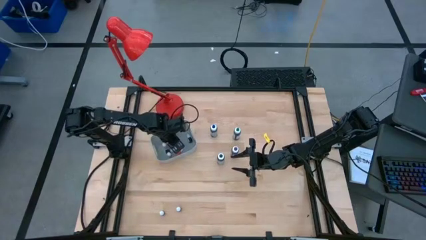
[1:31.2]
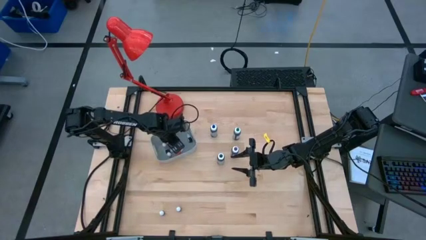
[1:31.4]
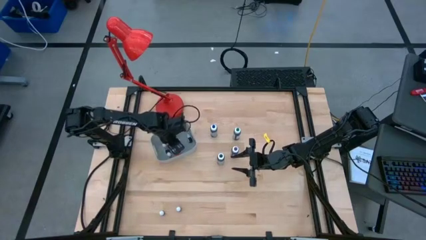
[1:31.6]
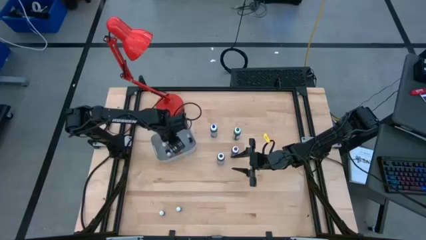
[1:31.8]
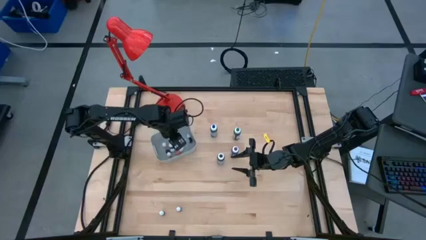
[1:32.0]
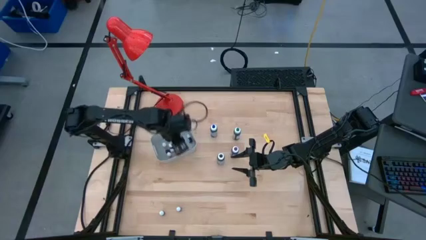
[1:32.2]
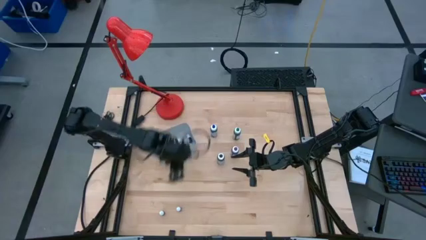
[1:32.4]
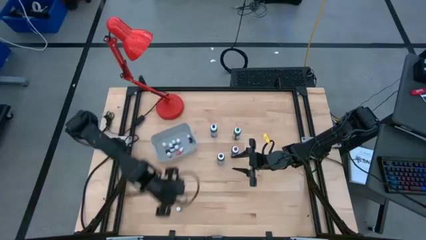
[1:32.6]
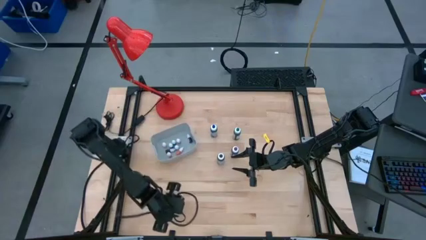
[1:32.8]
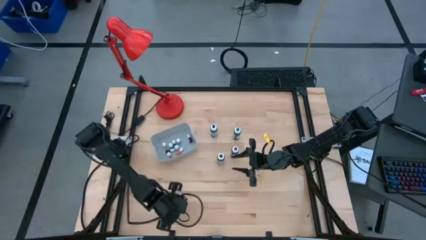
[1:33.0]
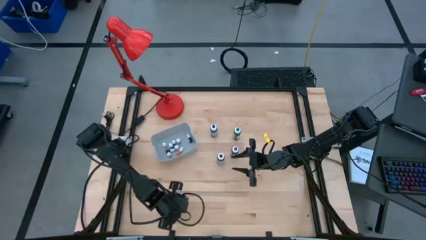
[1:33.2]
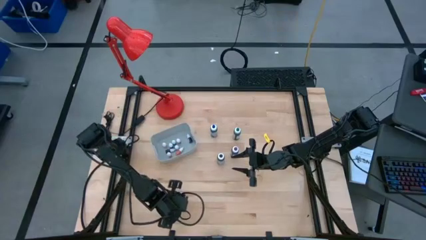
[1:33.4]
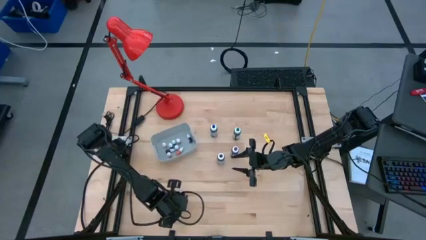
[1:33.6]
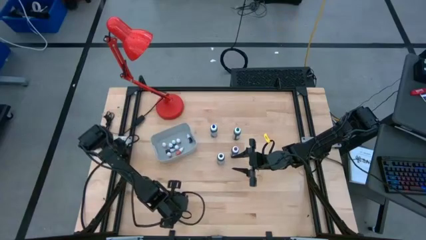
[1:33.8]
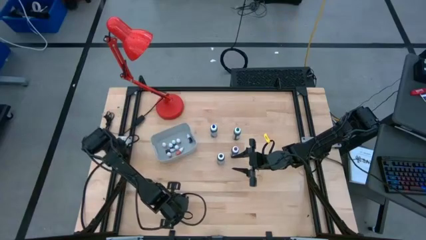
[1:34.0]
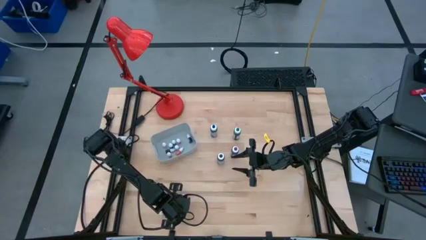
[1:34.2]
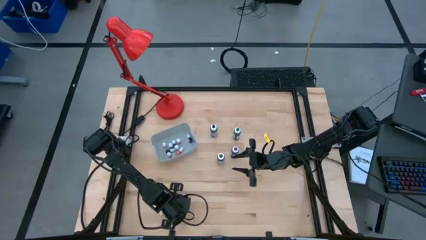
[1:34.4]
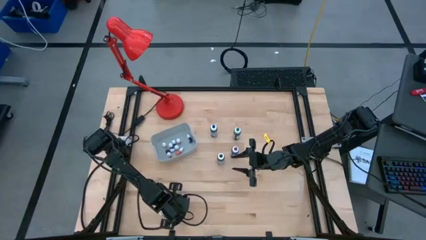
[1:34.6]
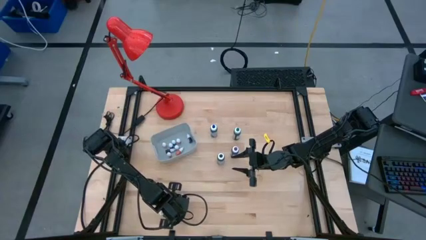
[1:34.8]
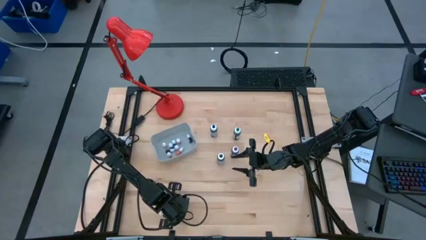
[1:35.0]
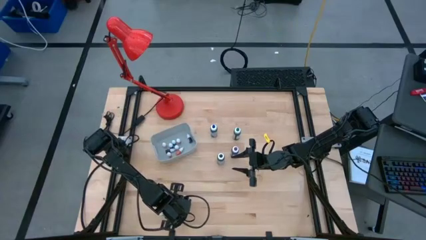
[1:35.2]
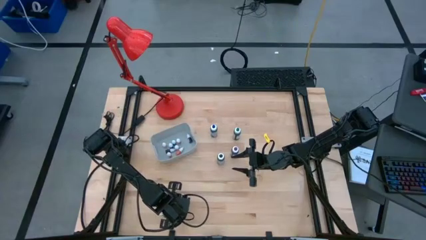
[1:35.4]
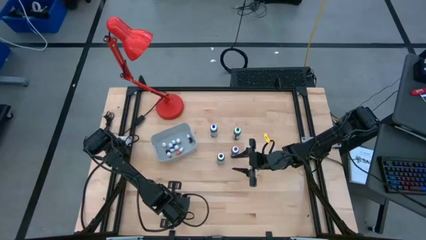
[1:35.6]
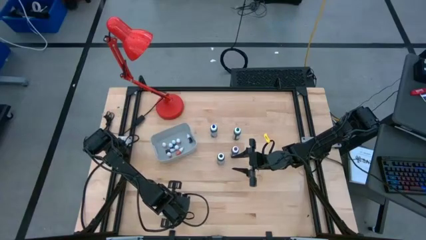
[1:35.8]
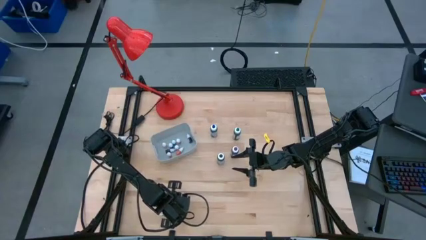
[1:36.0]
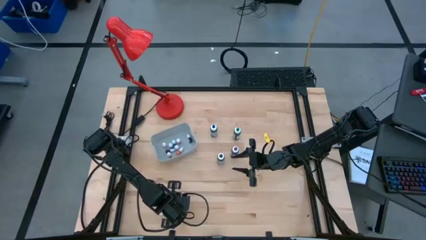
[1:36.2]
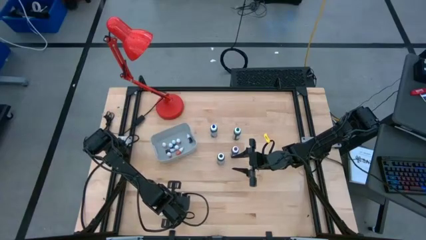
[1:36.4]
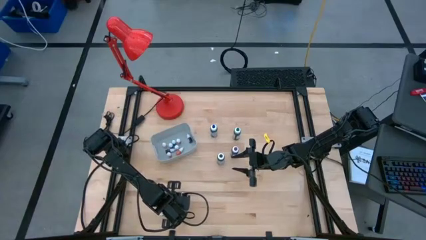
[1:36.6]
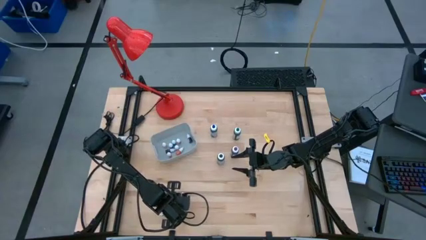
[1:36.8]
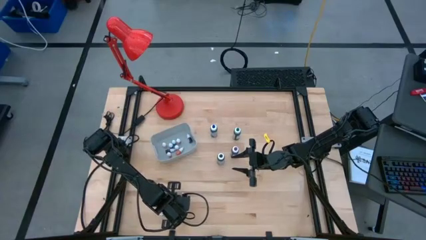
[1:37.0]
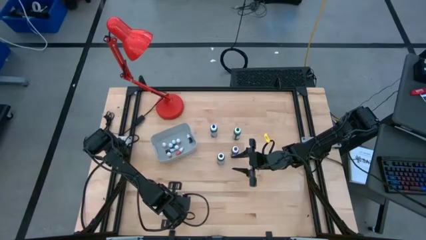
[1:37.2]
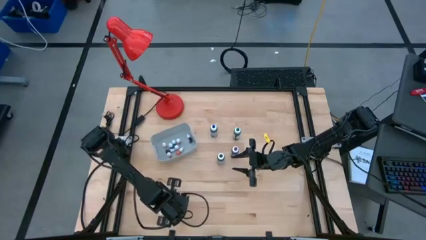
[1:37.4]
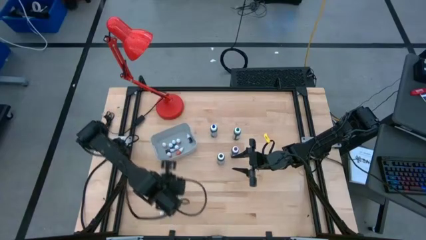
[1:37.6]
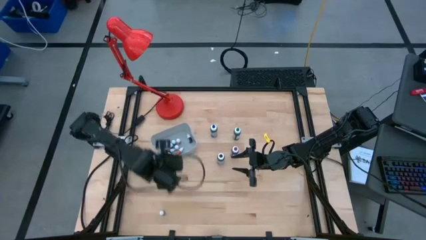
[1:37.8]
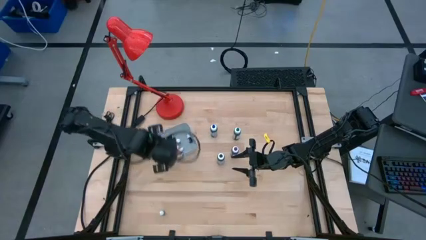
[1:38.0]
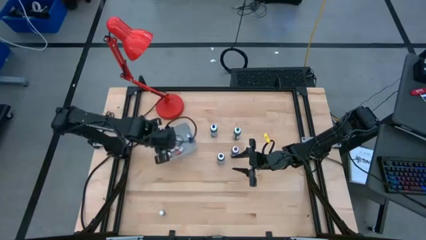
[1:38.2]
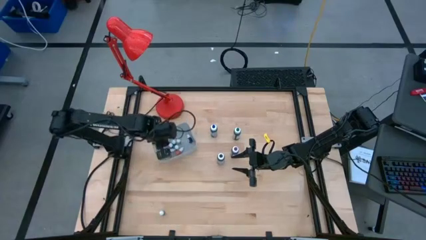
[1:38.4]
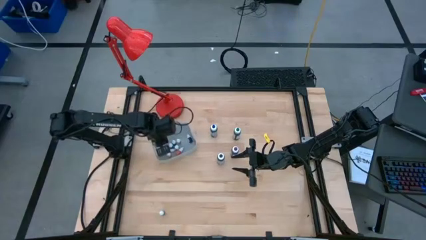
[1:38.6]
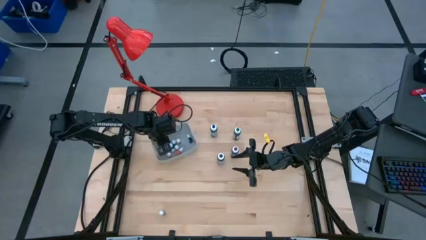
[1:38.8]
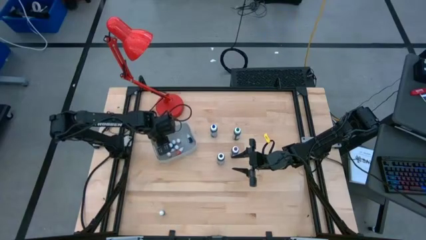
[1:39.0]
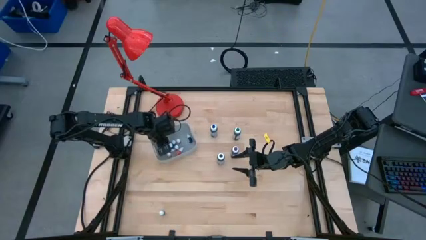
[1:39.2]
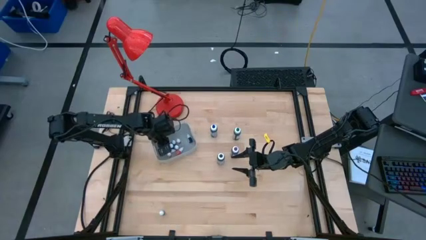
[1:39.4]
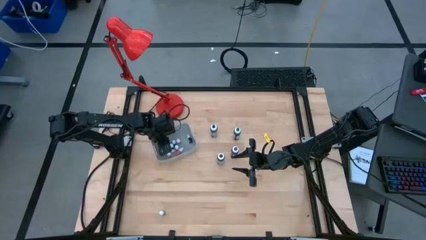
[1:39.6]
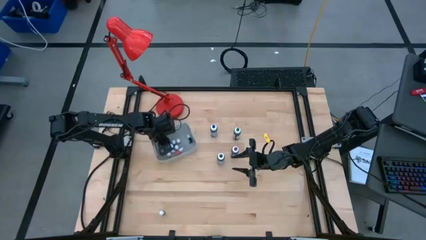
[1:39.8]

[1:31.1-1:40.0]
Task: Pick & Place food coloring
Put the small black coloring bottle into the gray container

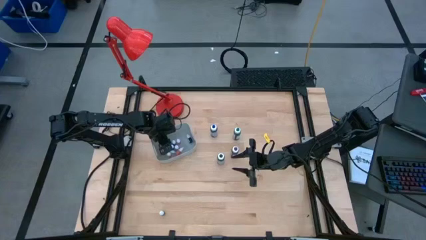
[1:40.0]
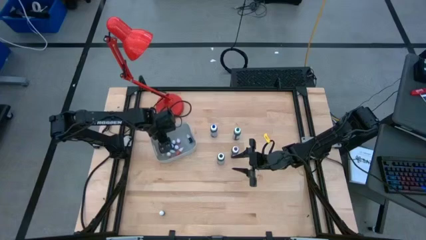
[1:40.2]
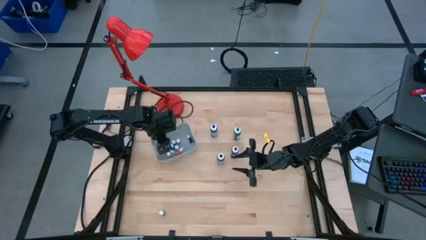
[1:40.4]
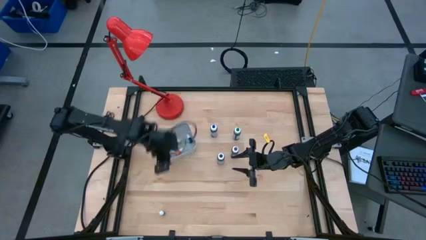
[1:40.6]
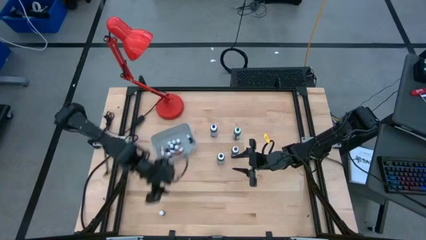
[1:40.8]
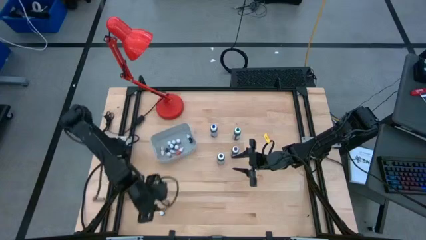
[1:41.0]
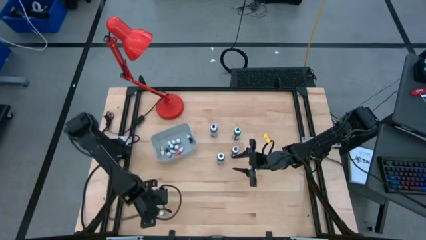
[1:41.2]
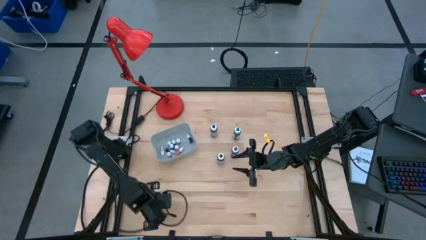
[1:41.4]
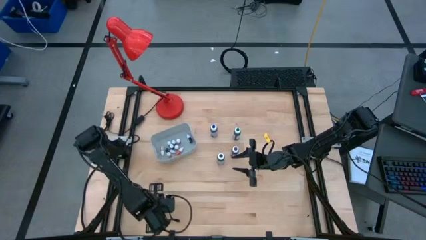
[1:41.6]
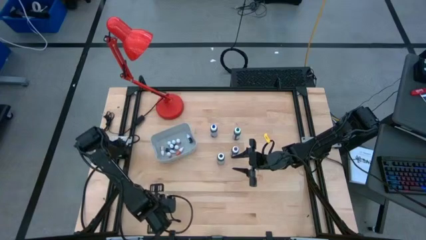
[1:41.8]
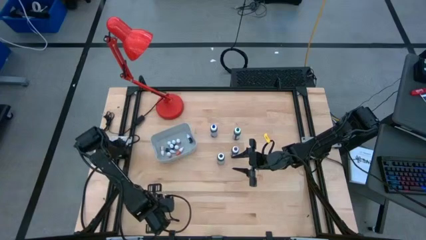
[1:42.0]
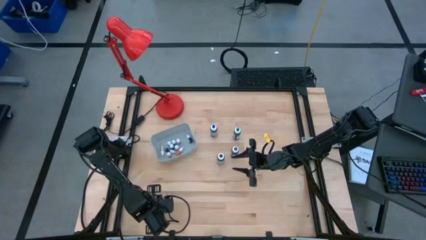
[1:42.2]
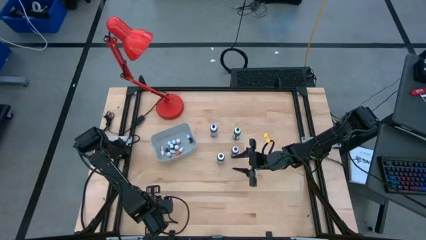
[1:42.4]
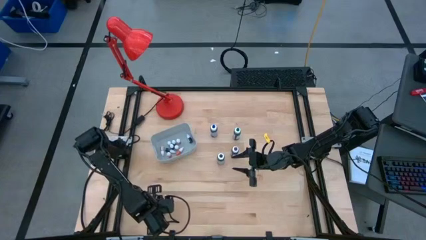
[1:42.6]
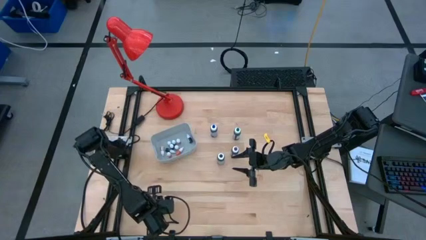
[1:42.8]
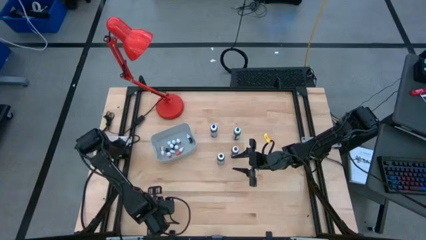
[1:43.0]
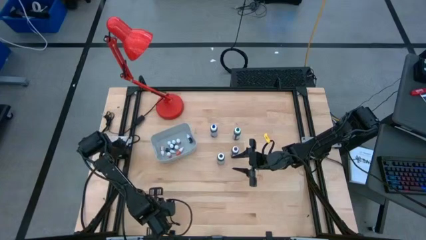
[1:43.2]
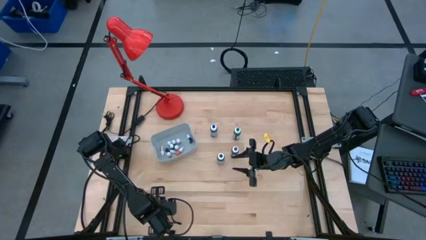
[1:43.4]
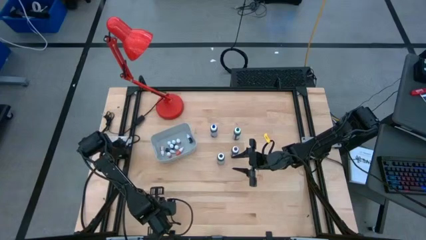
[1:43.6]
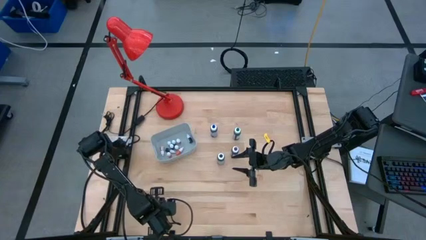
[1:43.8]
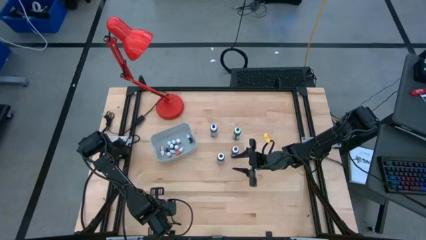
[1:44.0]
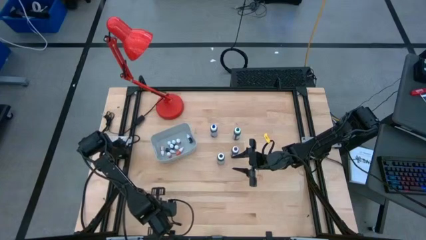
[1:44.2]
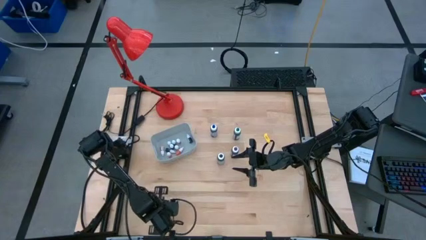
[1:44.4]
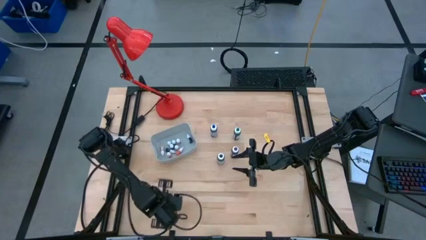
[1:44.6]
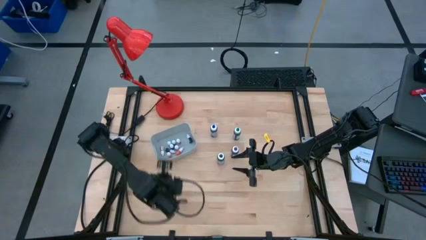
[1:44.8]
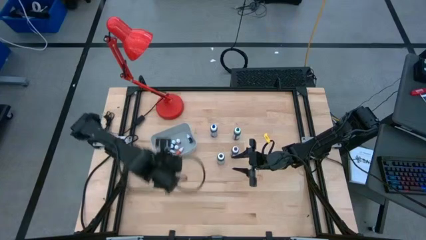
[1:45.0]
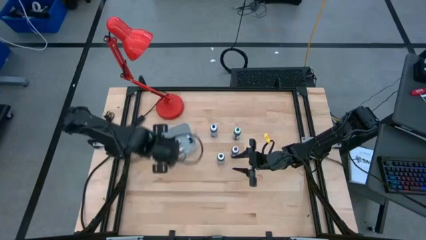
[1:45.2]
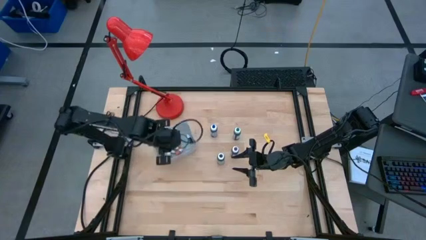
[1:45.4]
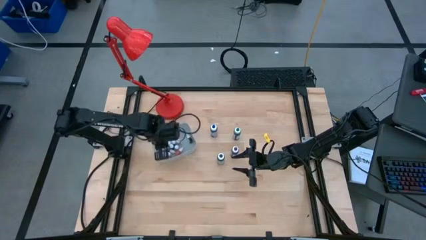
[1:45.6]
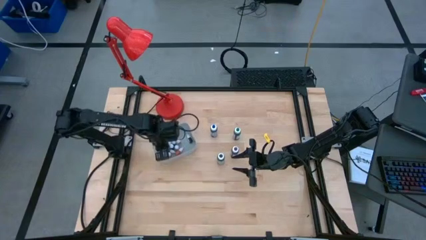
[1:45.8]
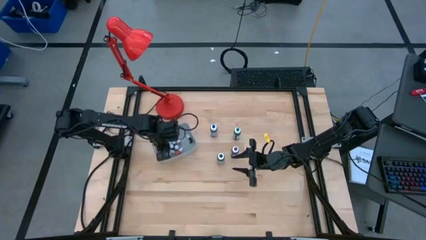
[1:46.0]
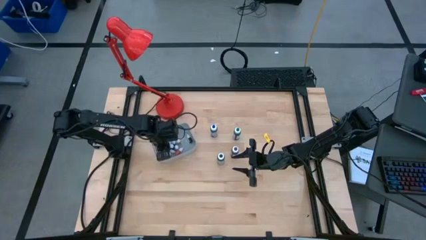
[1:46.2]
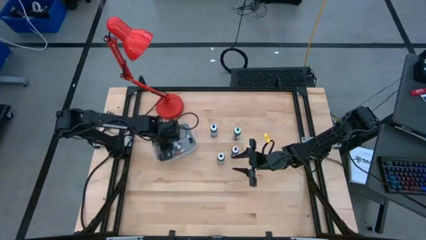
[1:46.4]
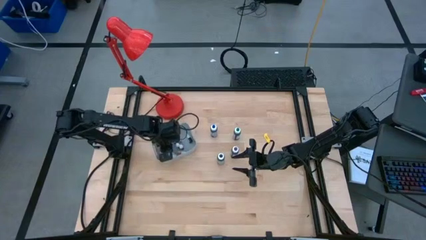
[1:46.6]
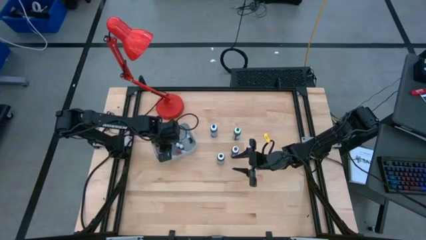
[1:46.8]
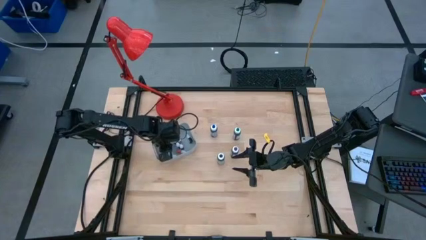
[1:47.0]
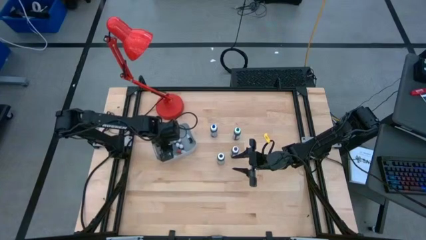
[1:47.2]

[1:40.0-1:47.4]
Put the small purple coloring bottle into the gray container
